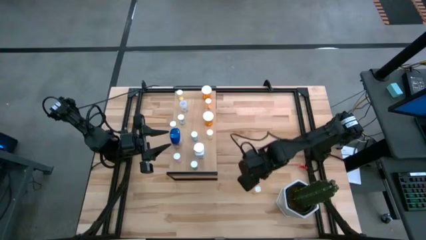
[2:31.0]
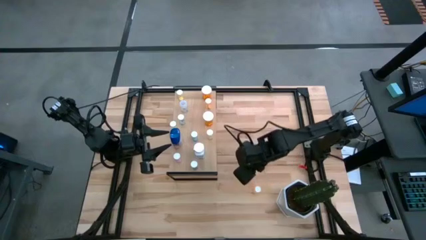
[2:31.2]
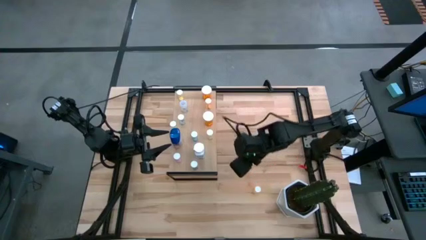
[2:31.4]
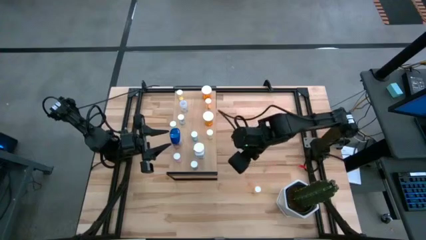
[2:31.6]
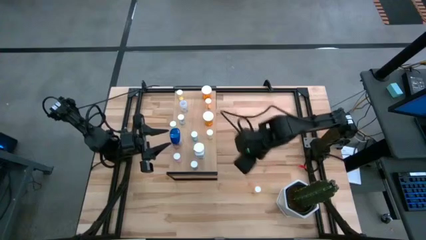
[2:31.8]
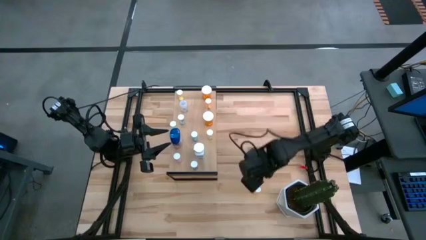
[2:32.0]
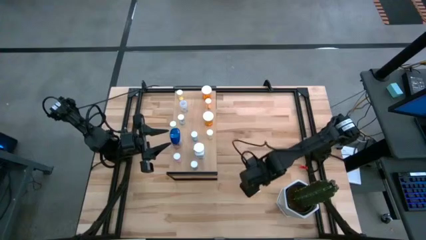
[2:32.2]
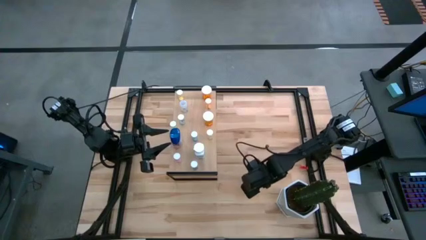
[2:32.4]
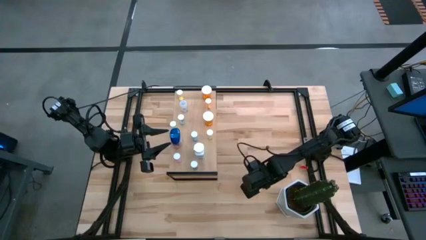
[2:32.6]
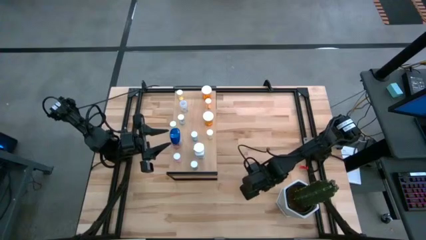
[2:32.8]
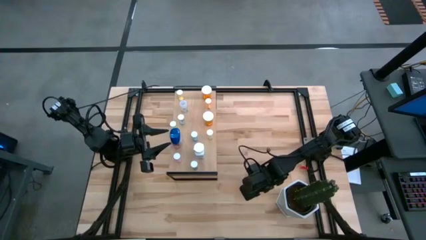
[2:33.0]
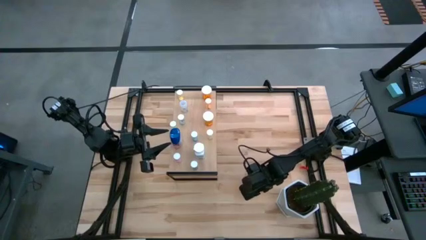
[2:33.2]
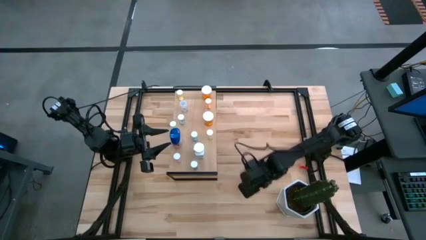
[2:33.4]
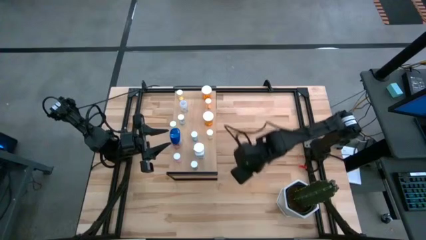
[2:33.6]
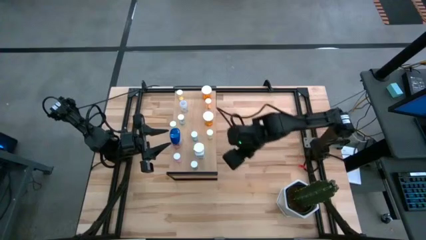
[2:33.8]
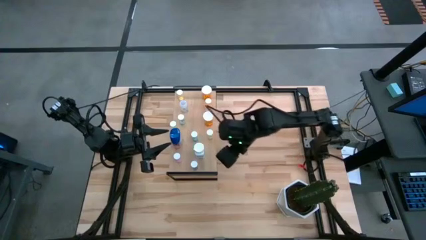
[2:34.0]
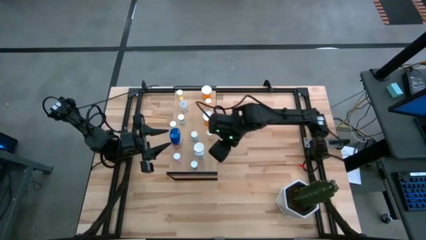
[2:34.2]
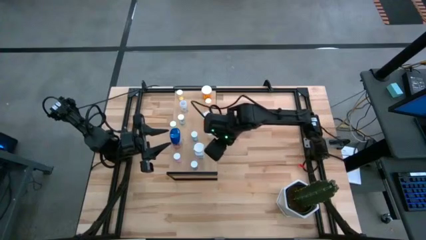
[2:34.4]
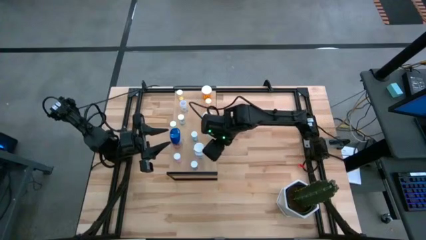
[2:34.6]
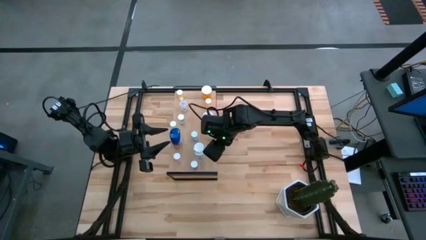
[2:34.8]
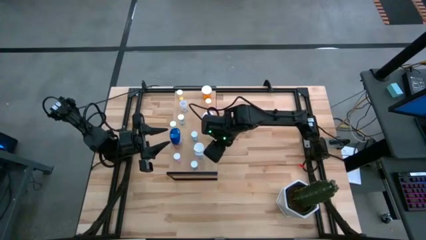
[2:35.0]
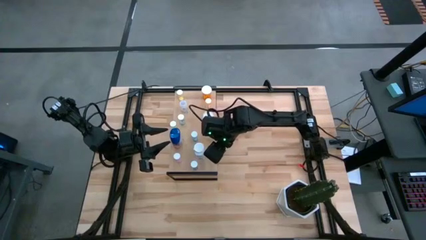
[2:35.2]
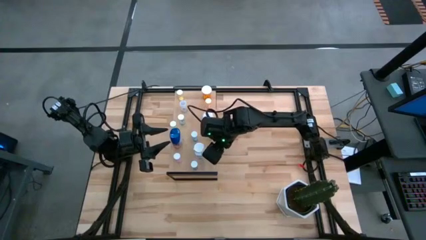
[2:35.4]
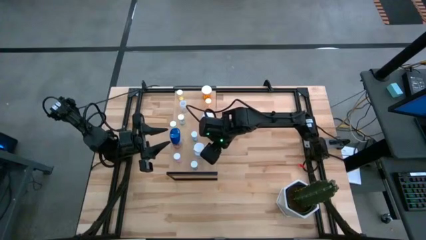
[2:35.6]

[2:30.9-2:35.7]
Task: Pick and place medicine bottles onto shelf by color
Put the yellow tablet bottle on the shelf

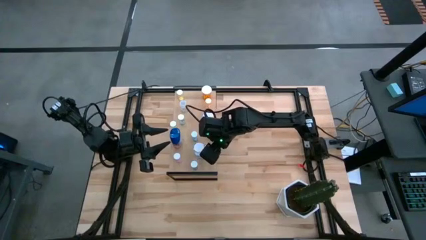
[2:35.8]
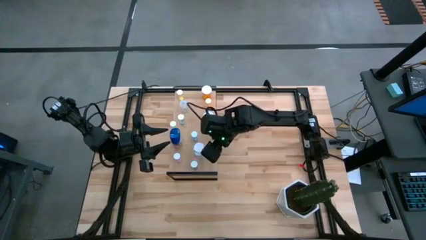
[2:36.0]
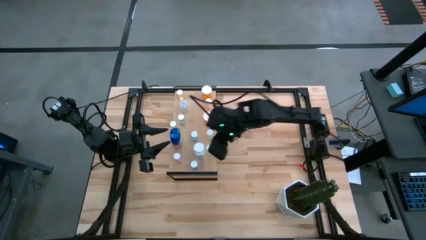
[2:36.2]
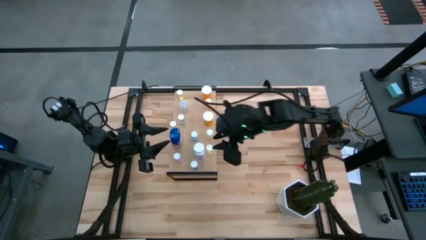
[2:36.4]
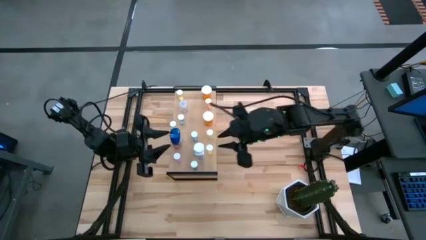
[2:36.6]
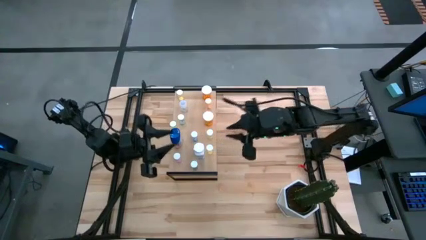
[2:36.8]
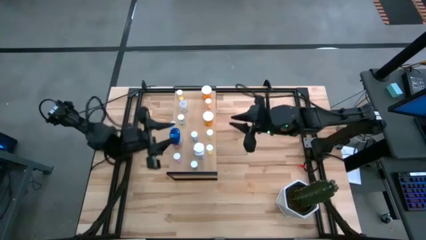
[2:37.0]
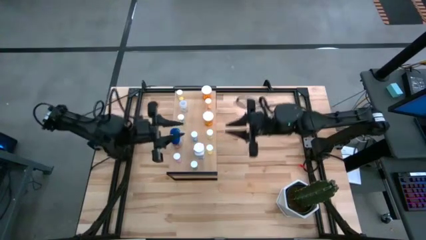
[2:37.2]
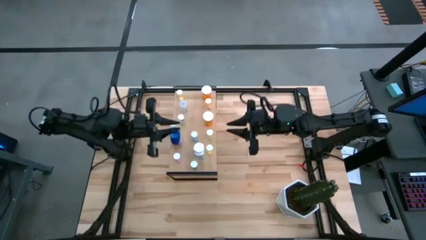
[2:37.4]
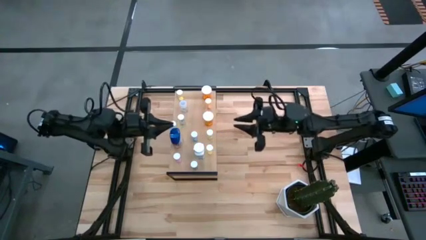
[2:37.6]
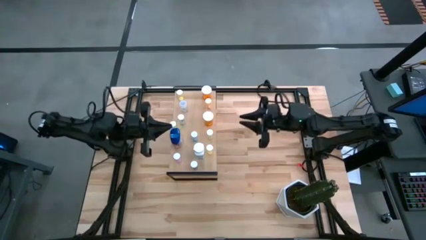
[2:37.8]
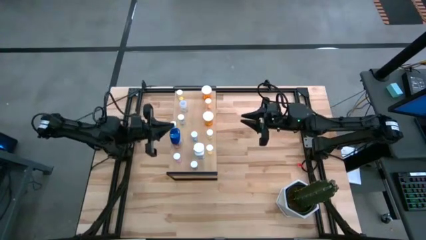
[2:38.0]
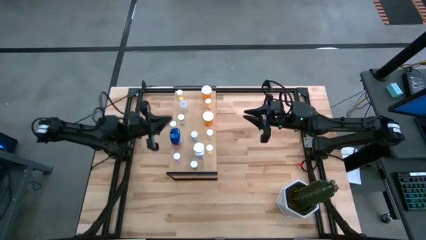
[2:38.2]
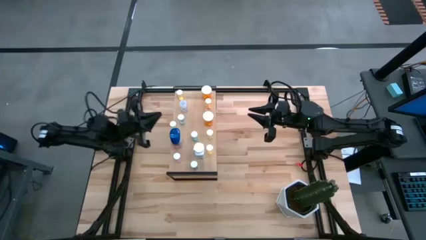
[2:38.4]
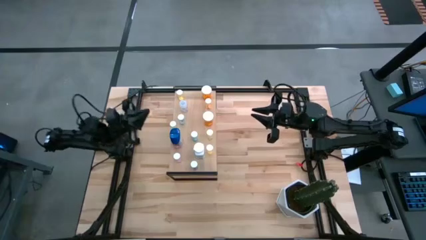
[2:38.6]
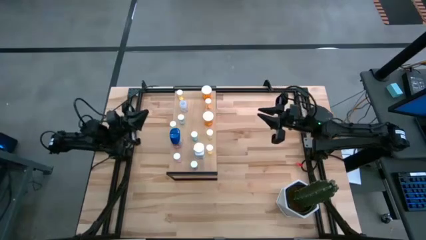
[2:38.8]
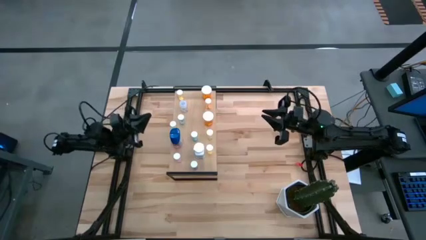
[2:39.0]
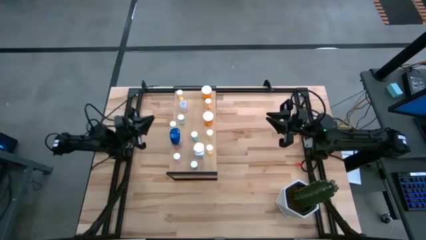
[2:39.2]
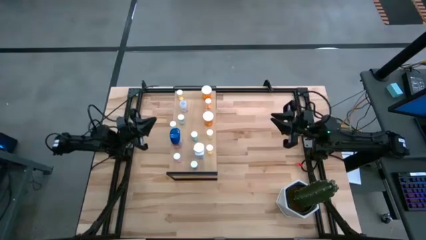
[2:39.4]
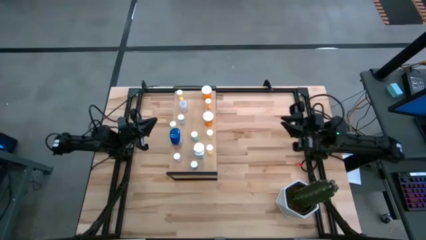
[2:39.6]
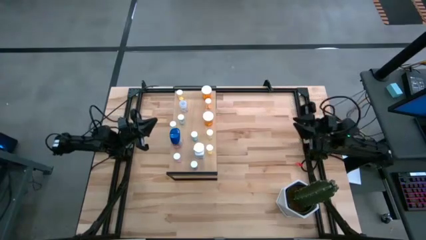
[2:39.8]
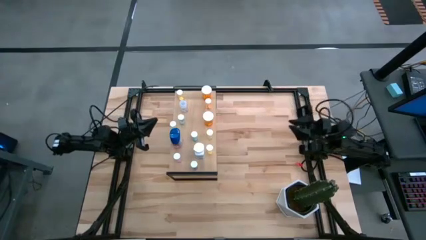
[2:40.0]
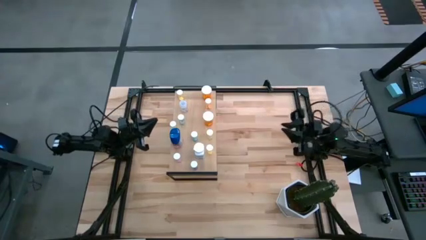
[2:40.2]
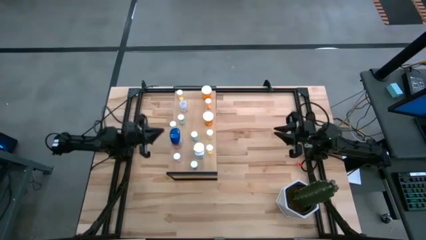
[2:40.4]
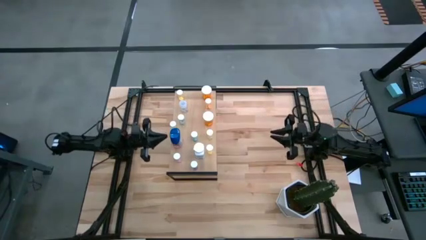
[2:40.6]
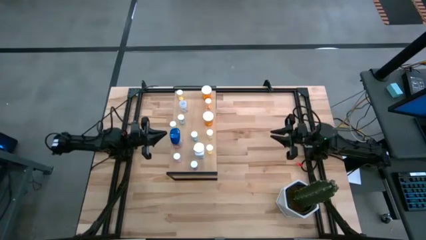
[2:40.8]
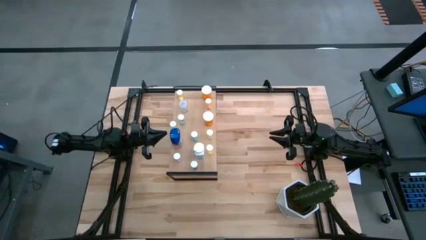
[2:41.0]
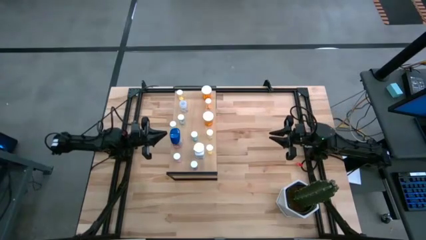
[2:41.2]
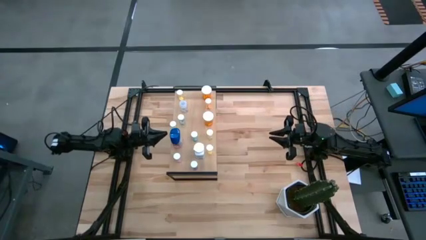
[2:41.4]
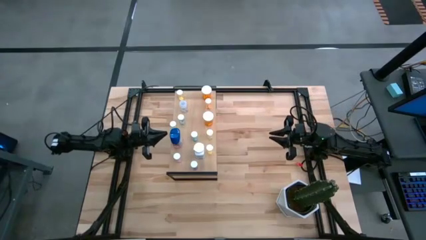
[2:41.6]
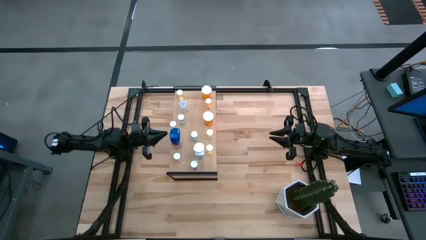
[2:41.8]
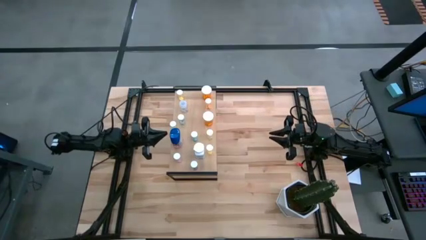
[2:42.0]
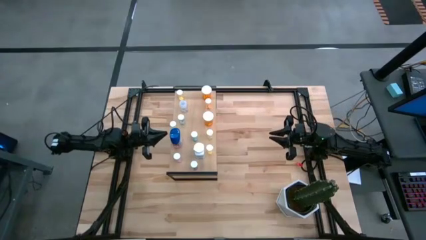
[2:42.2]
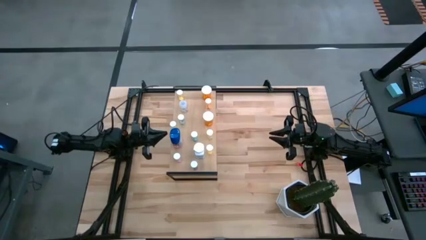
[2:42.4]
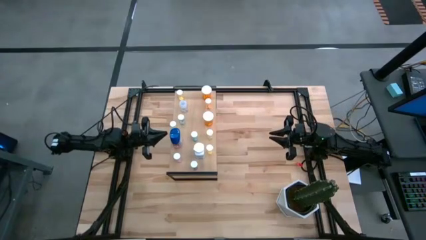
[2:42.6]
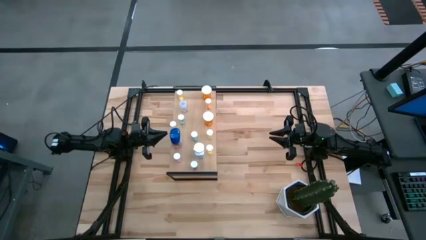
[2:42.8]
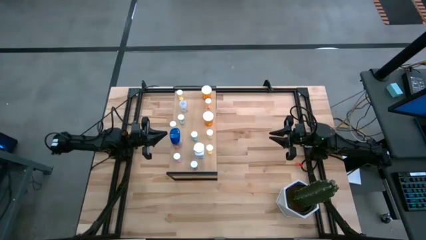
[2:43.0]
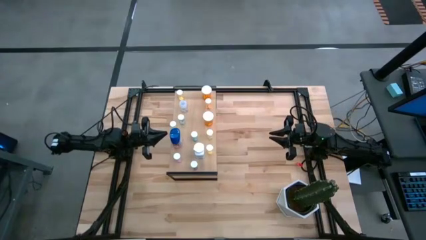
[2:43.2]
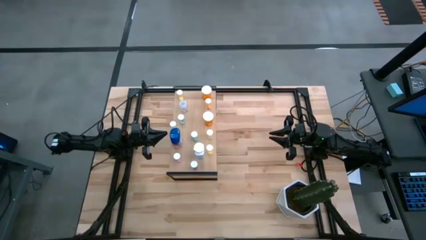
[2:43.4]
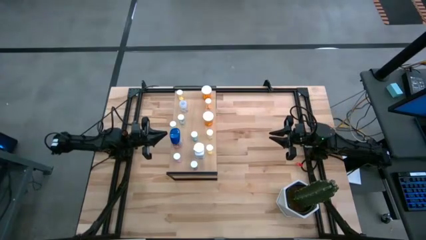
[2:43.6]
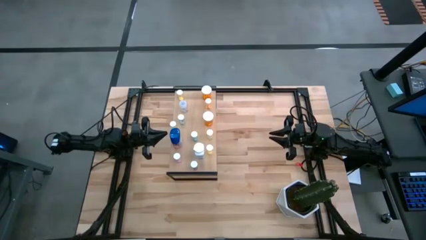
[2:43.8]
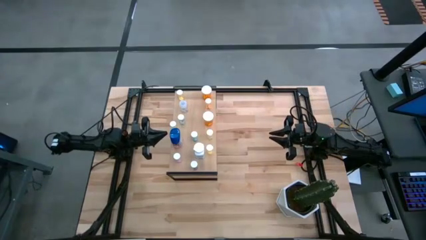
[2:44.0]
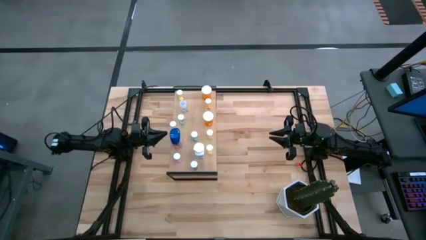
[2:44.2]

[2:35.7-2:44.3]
Return to Home Position

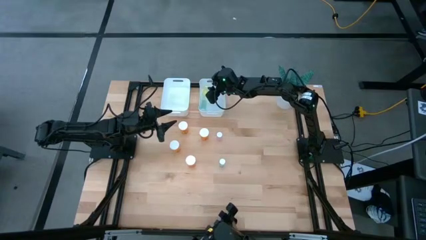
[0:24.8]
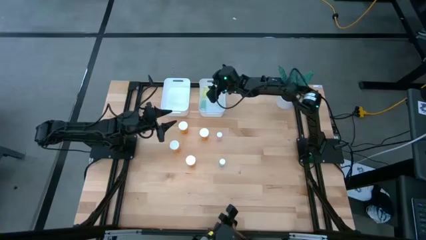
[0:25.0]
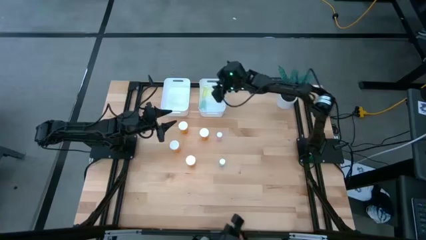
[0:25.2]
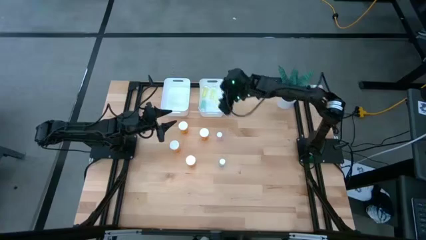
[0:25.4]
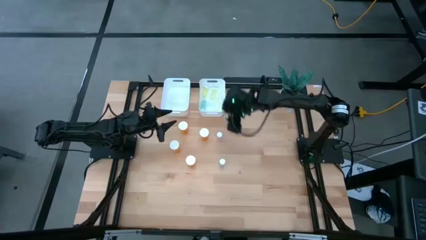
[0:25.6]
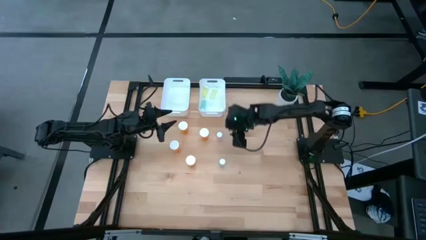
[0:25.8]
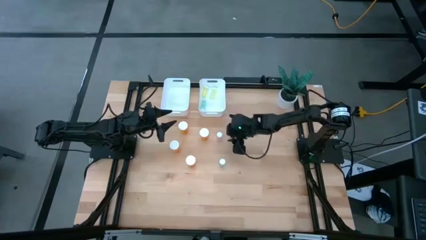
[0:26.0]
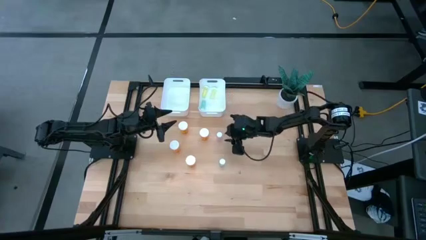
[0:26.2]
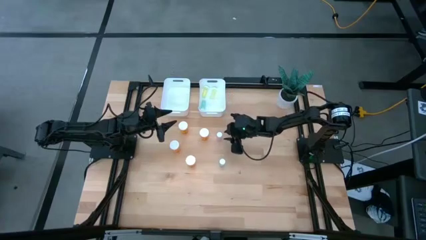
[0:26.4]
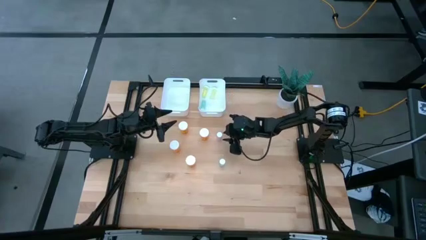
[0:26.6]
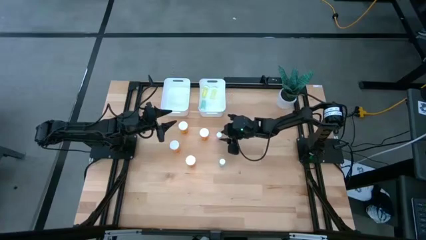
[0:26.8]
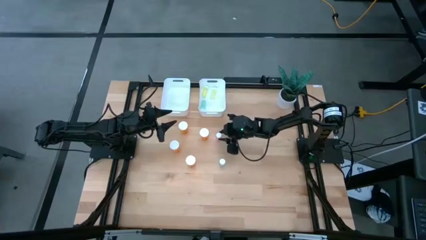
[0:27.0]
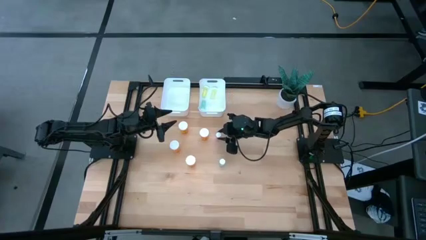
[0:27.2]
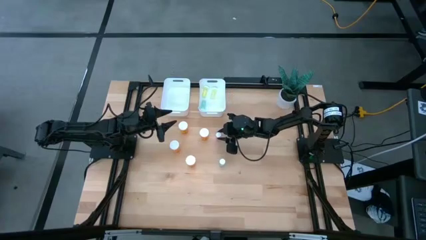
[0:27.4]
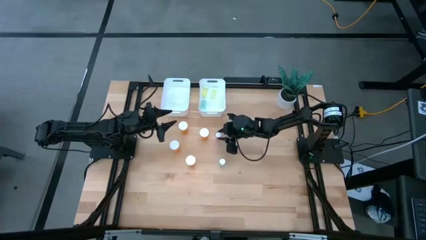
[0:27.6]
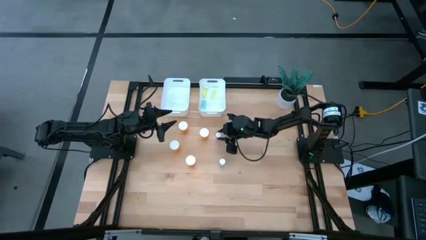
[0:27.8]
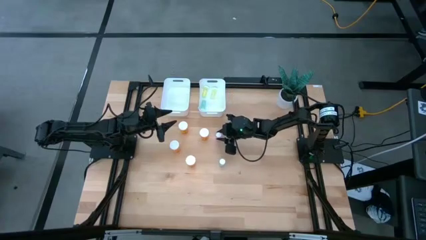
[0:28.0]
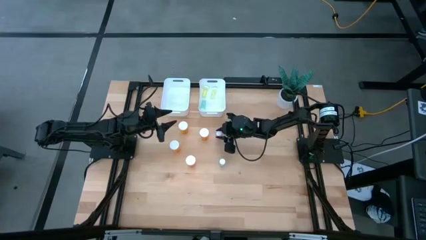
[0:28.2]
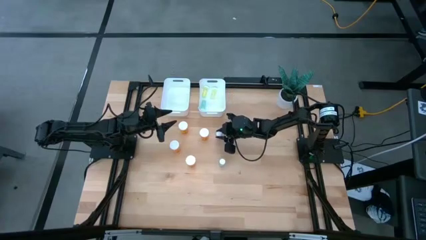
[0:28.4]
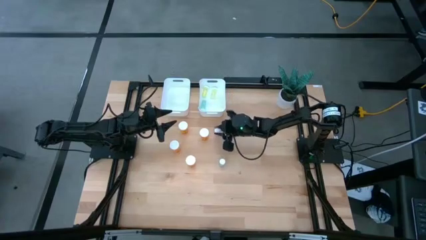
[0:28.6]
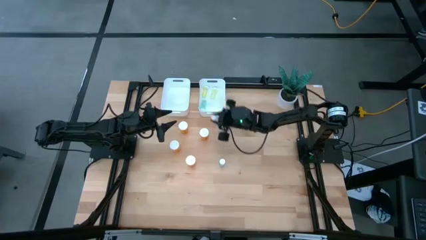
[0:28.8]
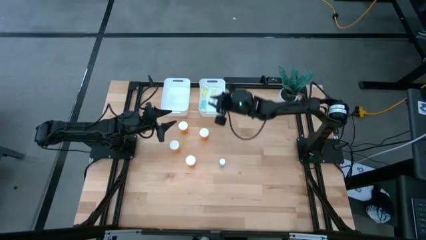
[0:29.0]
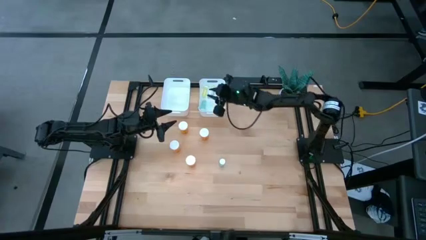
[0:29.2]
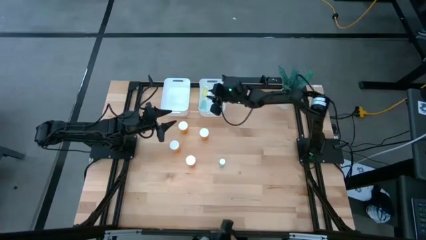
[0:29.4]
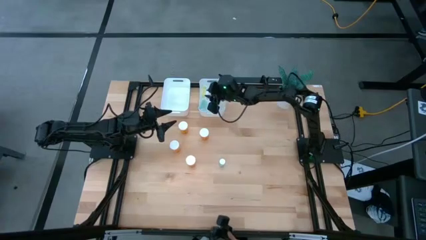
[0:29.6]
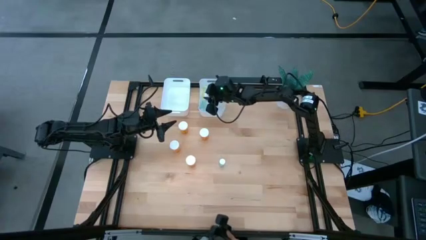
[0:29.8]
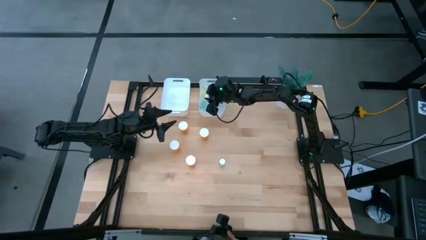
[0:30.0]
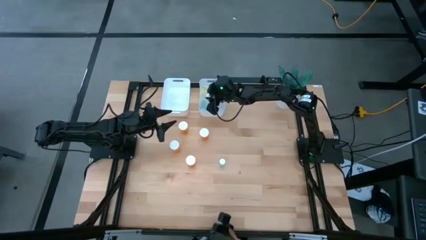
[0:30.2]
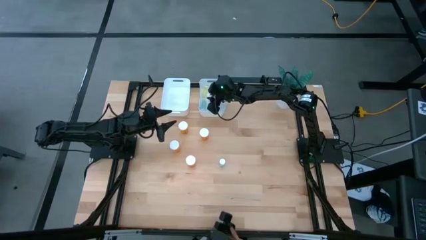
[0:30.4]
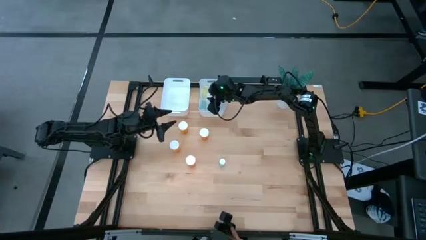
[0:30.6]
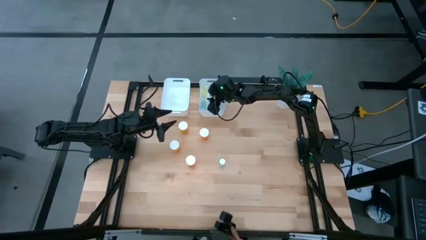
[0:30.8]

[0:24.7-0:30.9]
Task: Pick and place medicine bottles into bin by pill shape (circle, oval)
Put the small pink pill bottle into the right white bin
